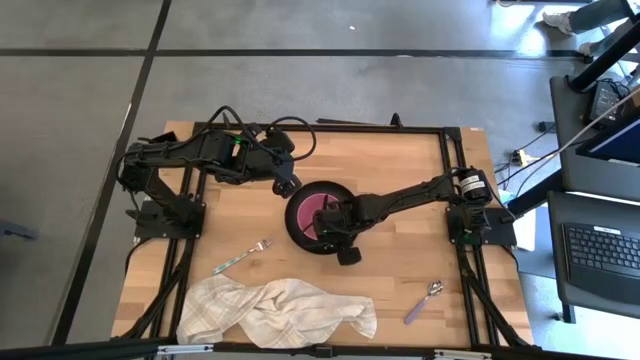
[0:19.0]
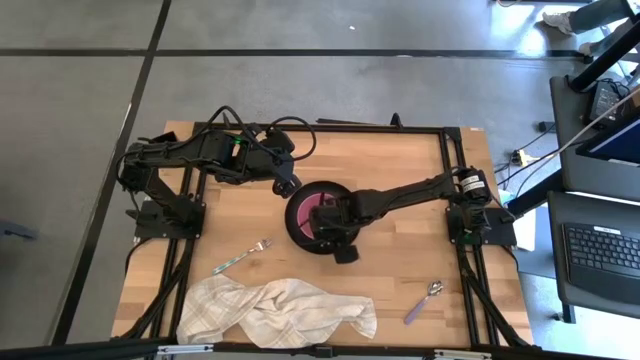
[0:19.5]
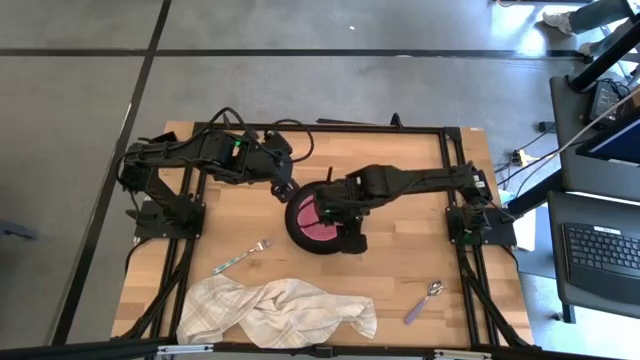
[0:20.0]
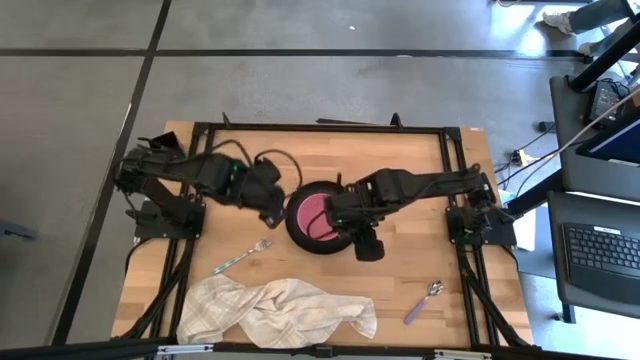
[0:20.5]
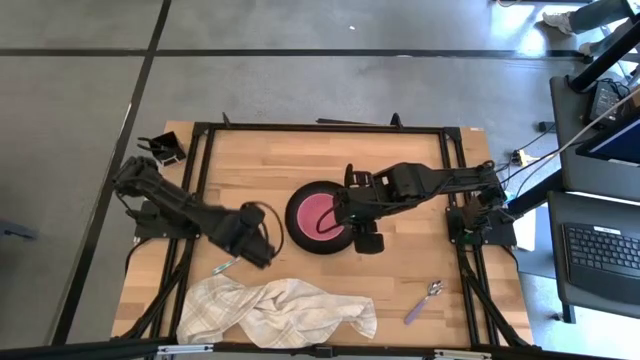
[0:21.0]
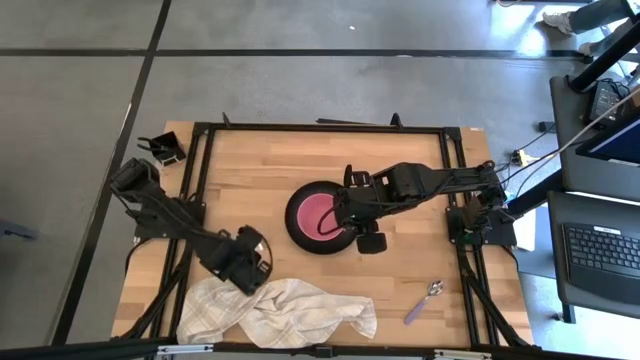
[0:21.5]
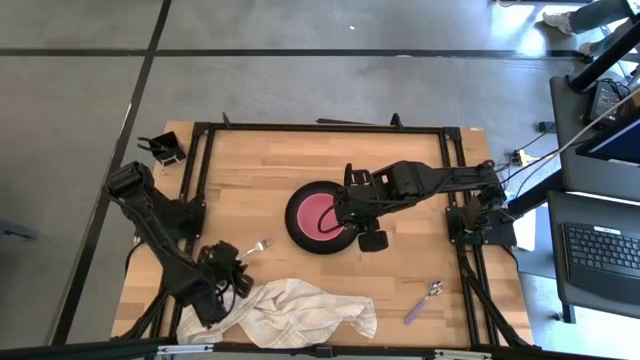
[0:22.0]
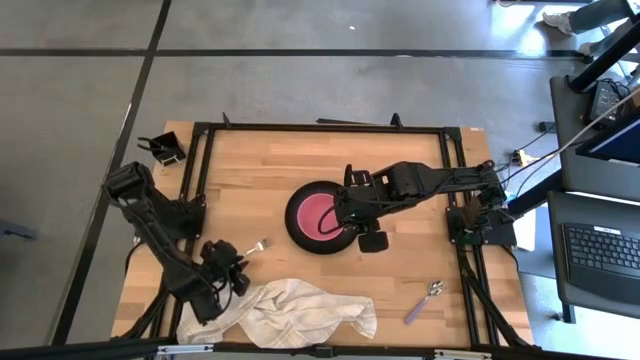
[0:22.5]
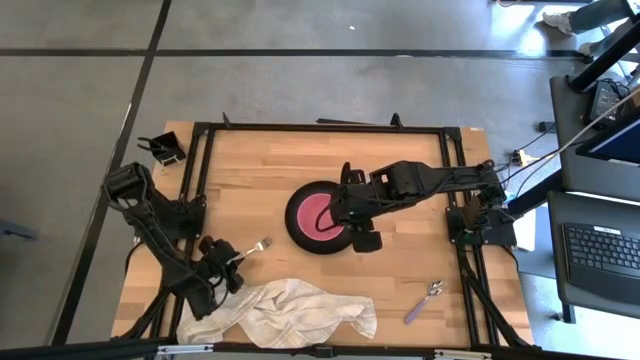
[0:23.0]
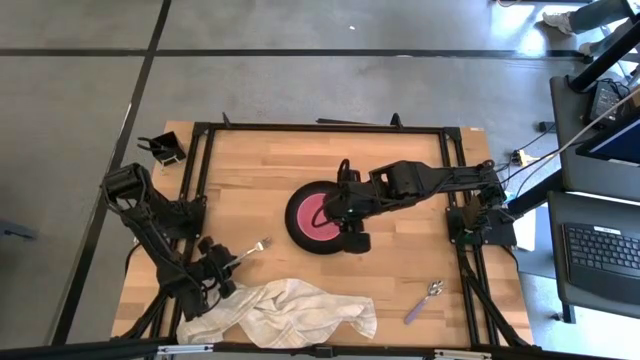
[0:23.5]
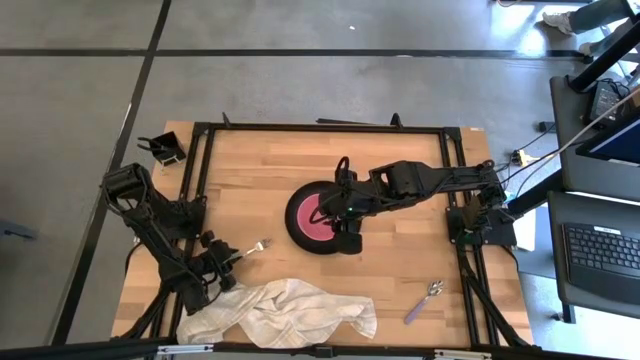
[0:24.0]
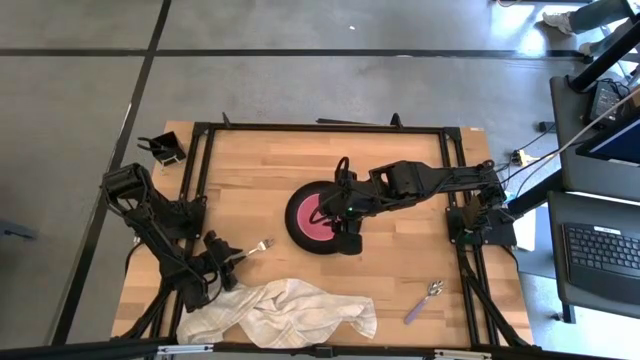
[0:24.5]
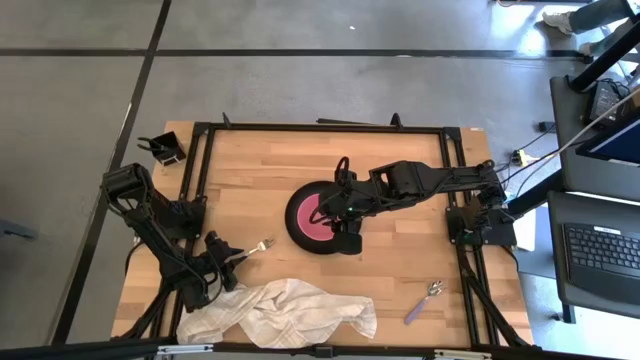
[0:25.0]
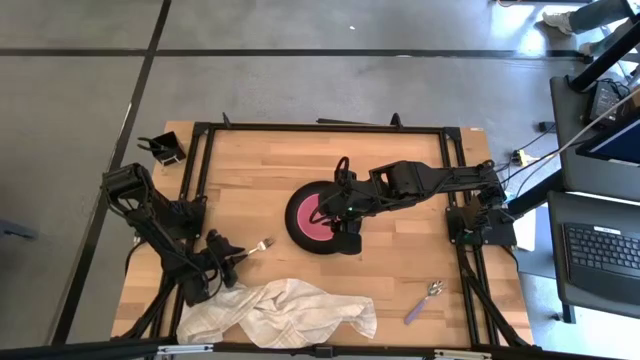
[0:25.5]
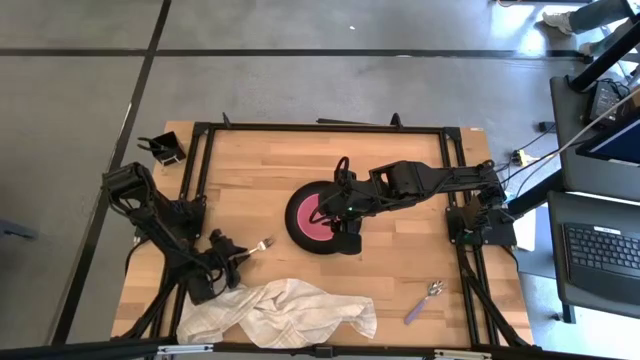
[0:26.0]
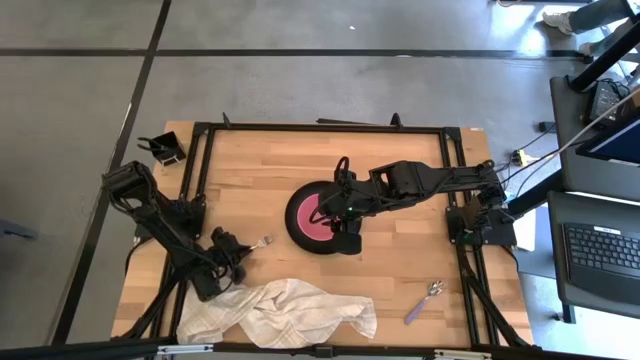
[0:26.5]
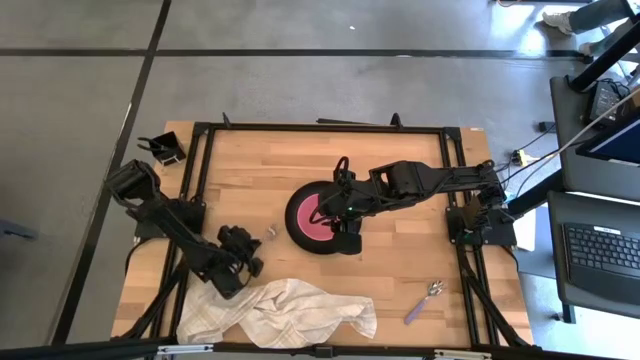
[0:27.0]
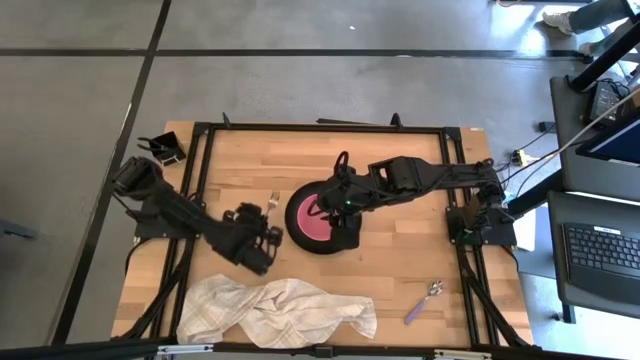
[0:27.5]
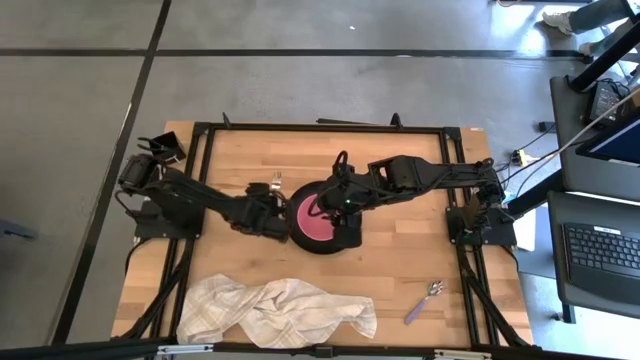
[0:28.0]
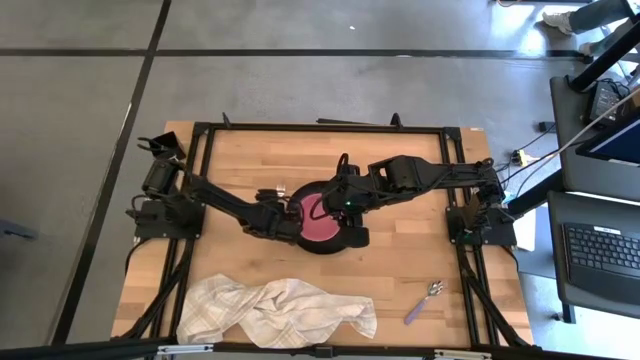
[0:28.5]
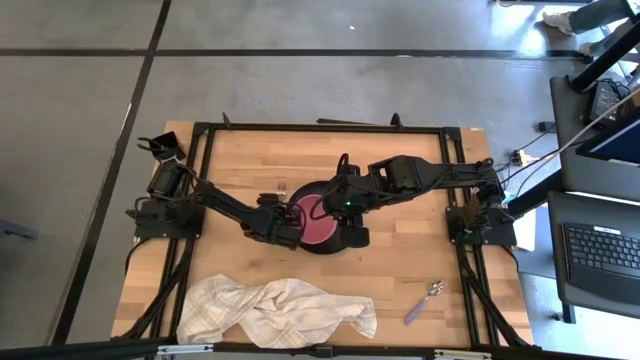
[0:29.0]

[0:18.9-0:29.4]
Task: Set table place
Put the green fork beside the black plate

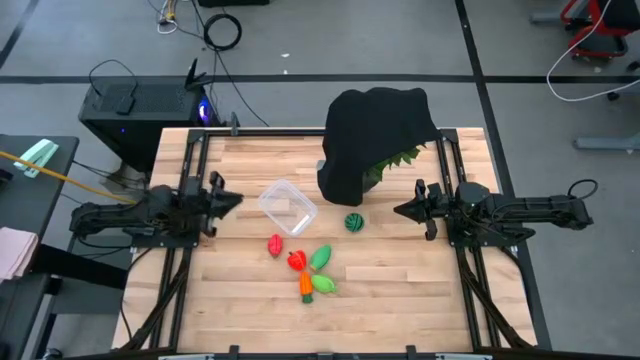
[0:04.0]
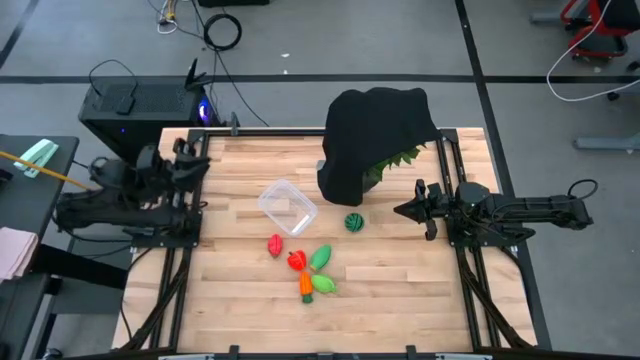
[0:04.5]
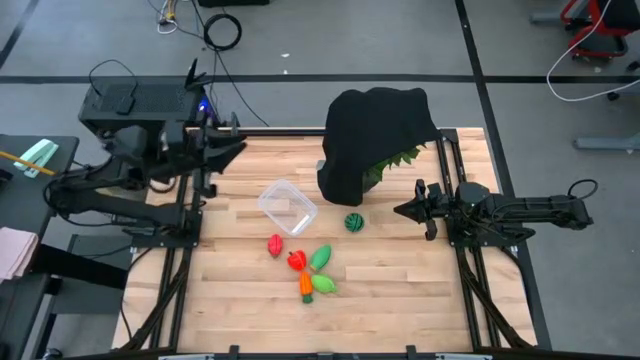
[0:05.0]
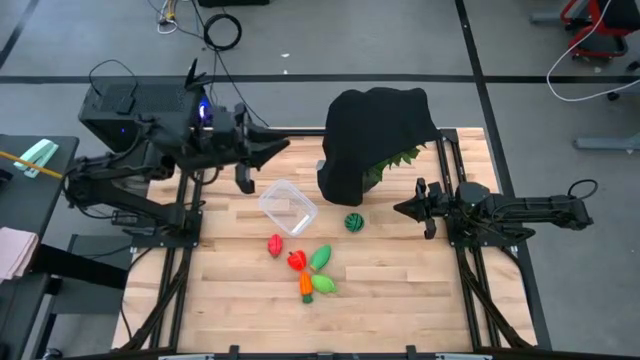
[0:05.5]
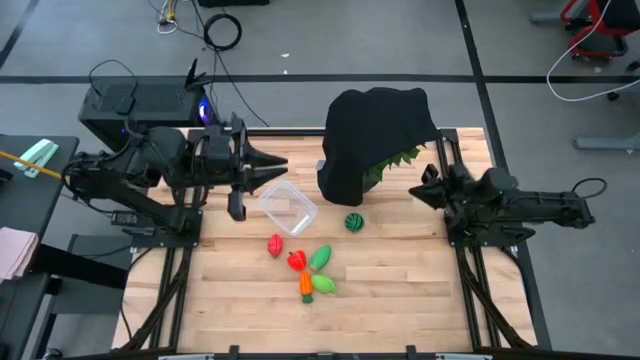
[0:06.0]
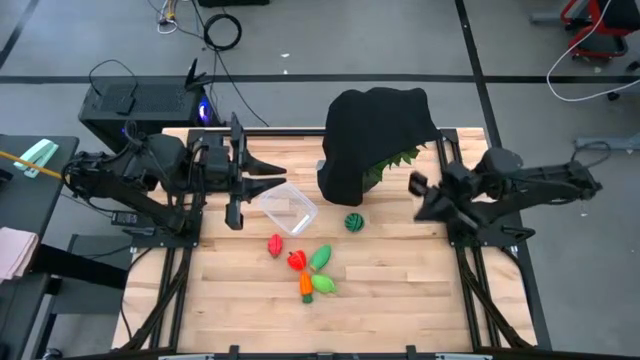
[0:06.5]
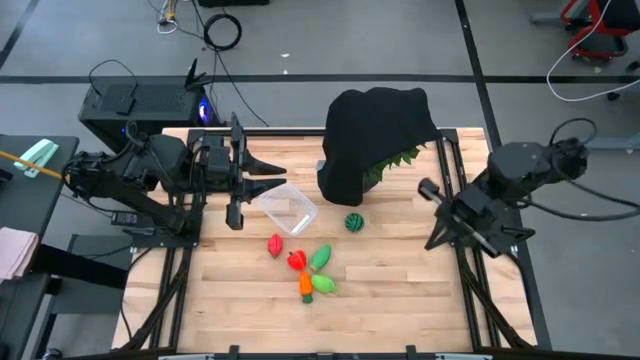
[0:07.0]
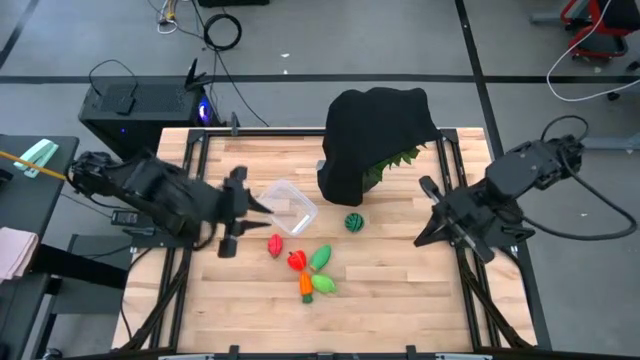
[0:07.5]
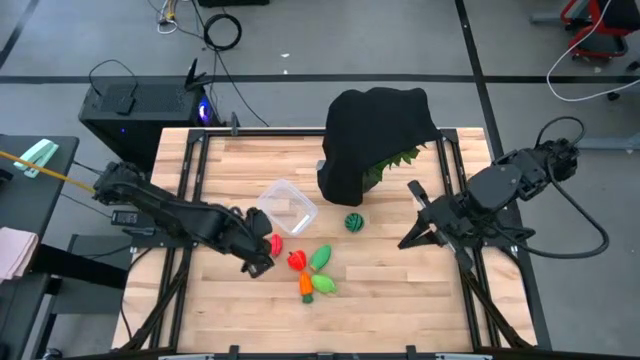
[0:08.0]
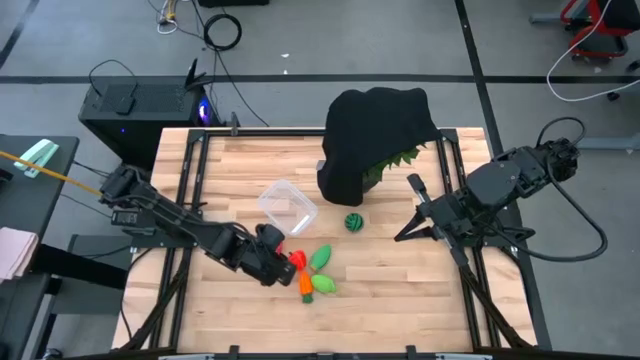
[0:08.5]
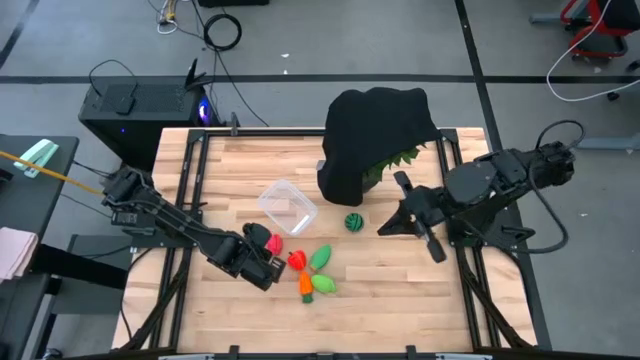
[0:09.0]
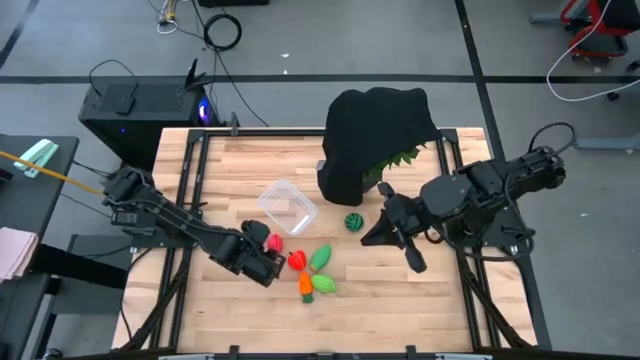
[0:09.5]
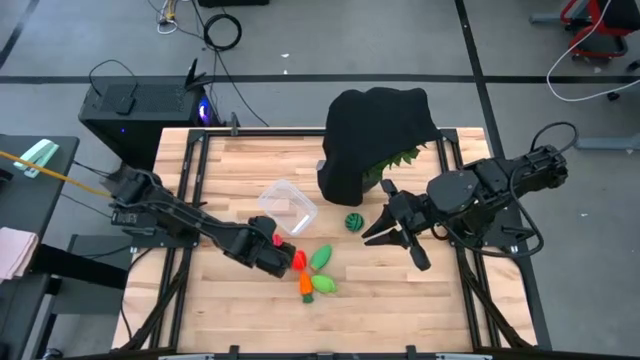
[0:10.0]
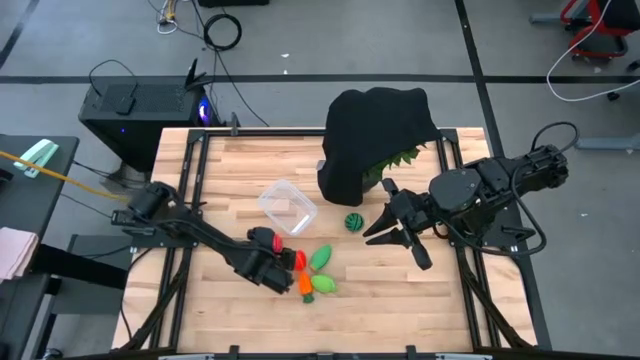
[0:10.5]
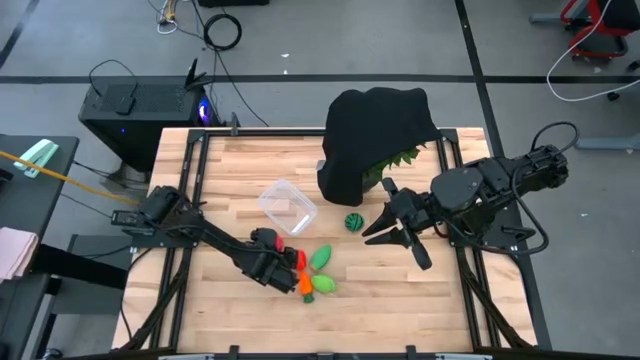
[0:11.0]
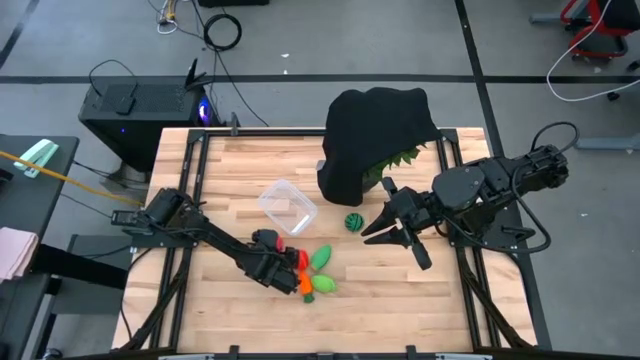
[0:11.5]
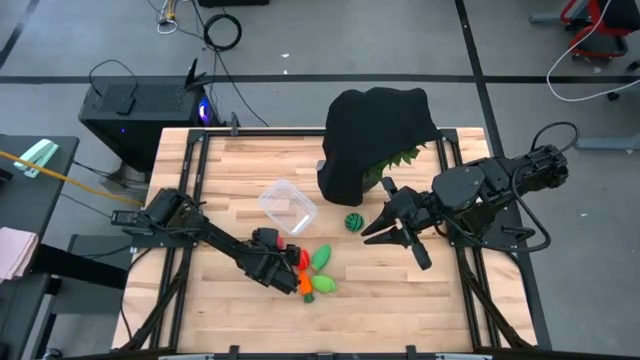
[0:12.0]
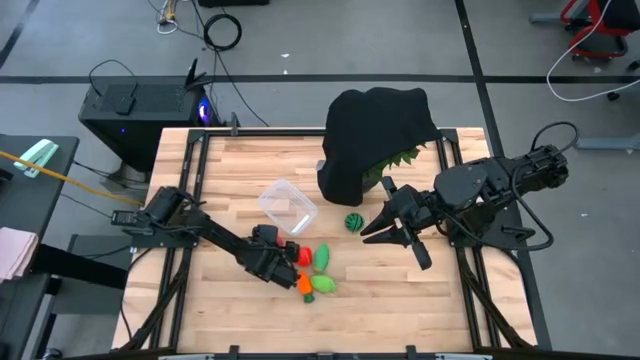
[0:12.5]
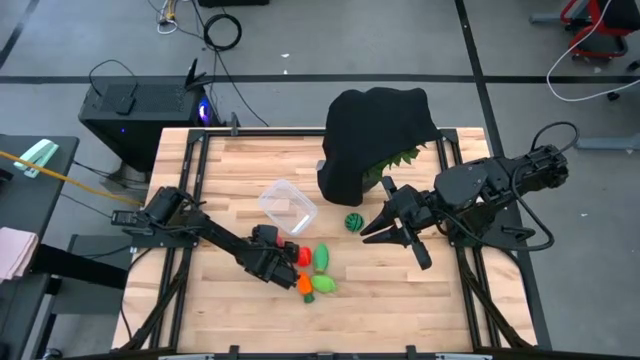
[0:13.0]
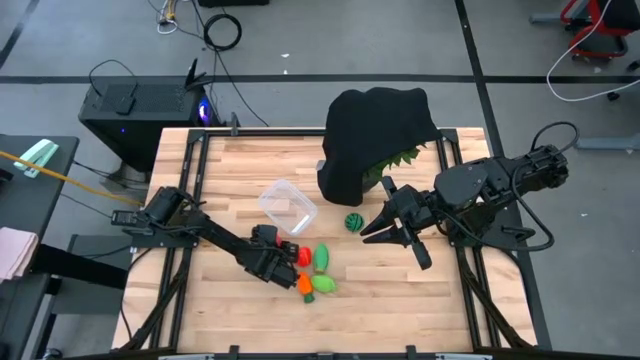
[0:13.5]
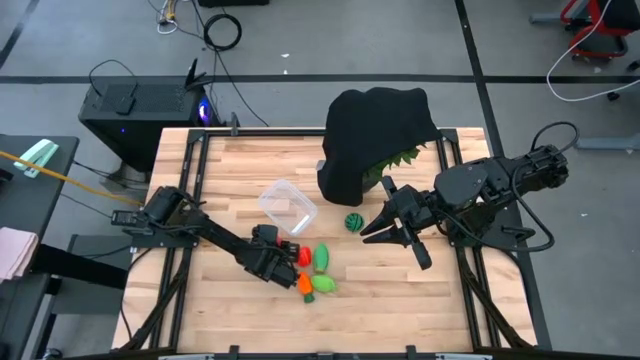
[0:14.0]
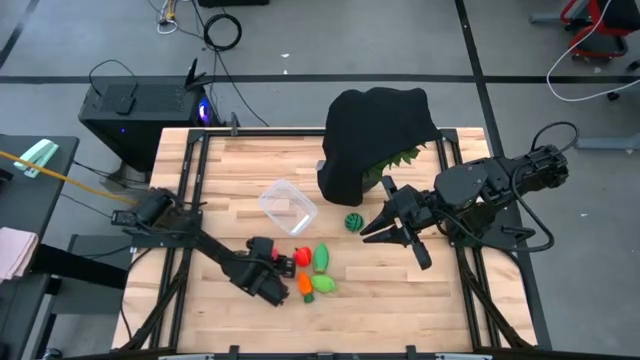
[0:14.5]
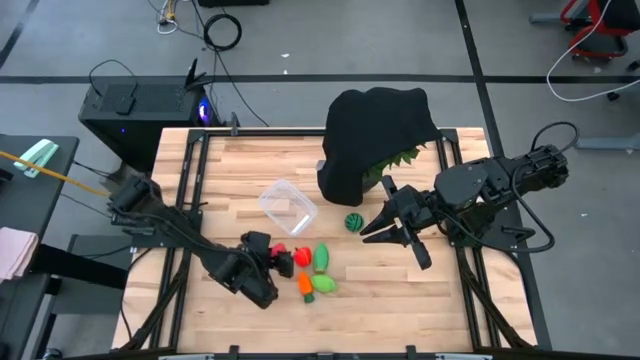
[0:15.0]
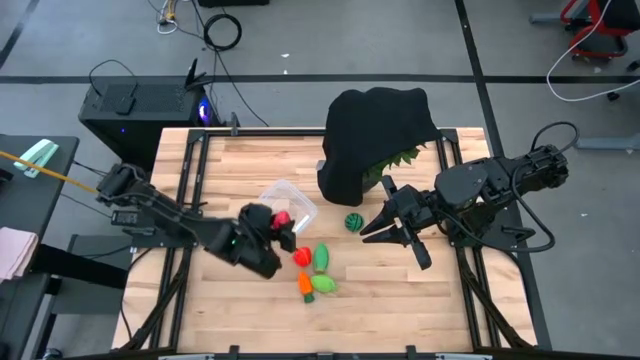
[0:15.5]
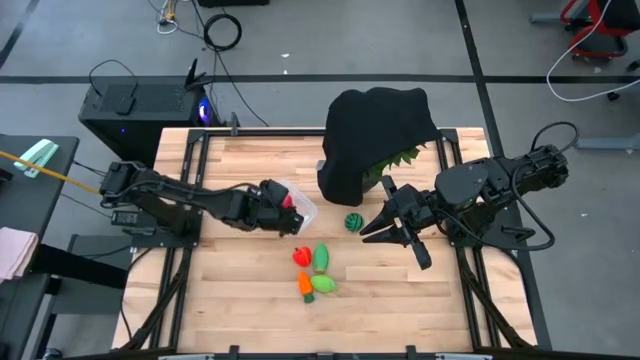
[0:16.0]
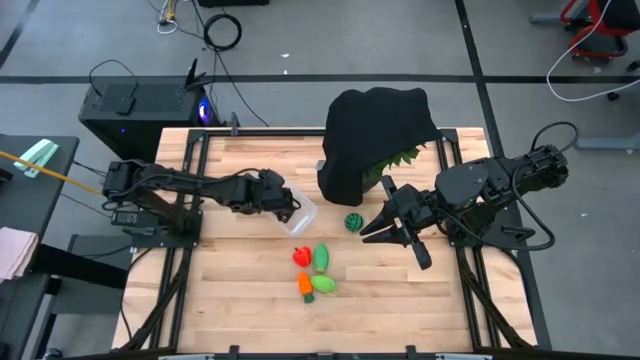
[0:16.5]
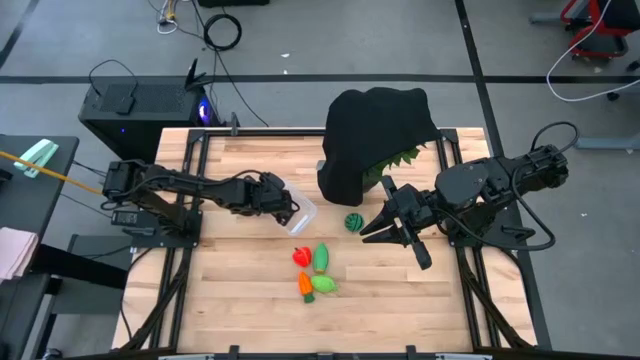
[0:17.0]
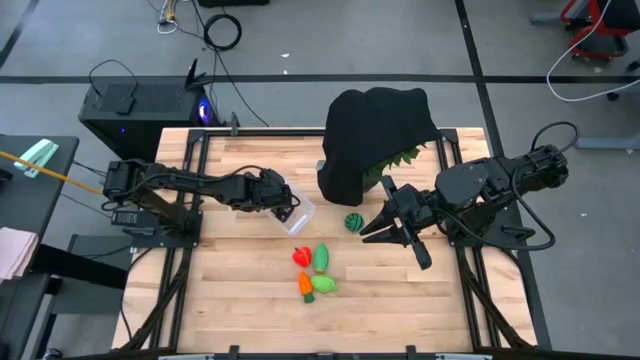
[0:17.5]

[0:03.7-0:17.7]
Task: Pick and placing Produce into tupperware
Put the red dragon fruit into the transparent bin
